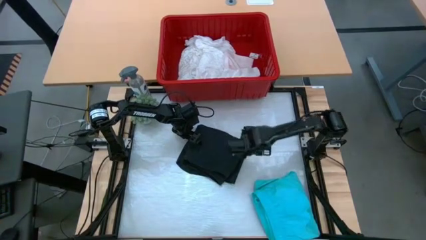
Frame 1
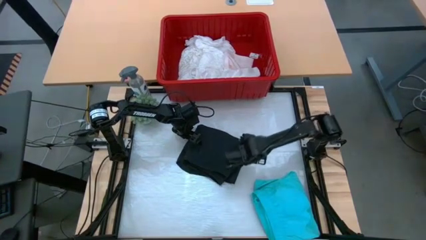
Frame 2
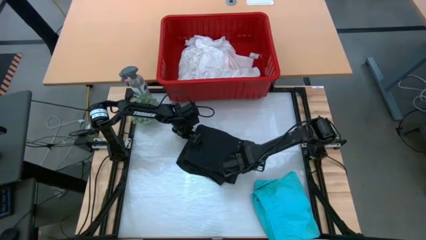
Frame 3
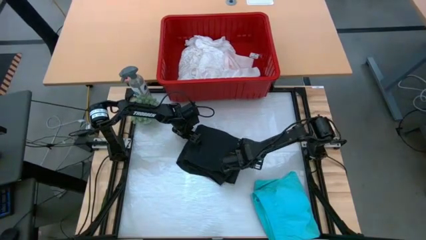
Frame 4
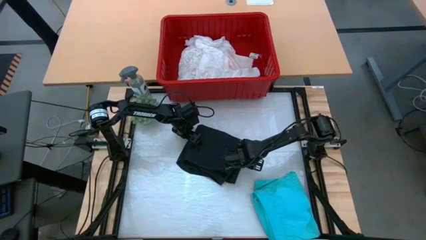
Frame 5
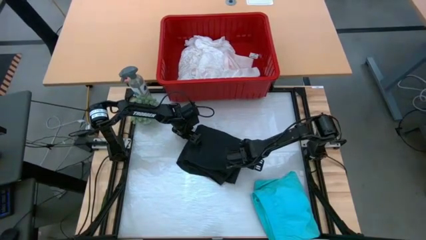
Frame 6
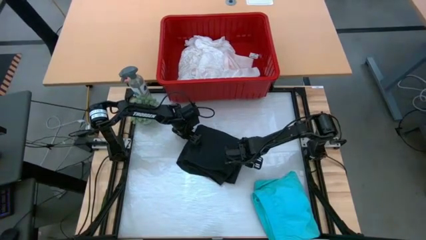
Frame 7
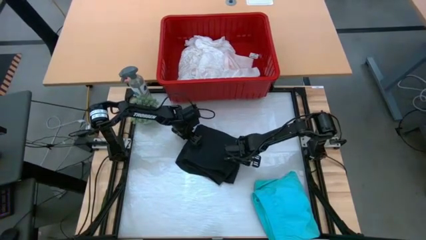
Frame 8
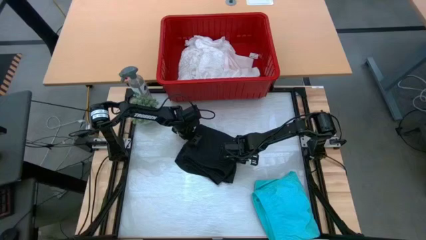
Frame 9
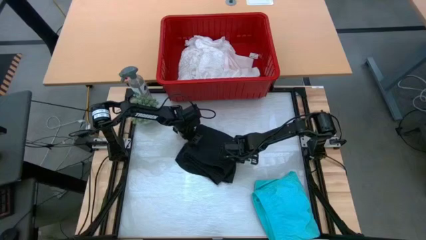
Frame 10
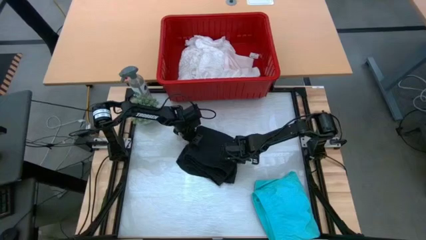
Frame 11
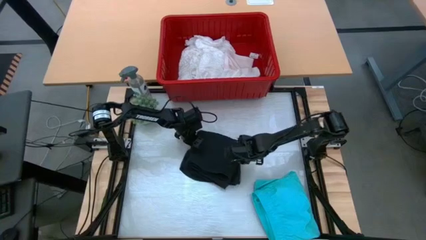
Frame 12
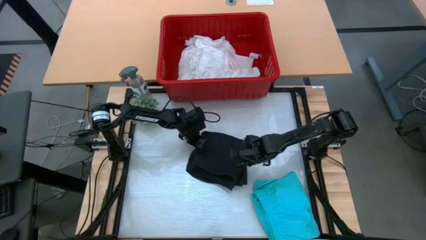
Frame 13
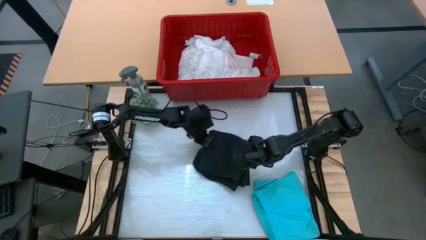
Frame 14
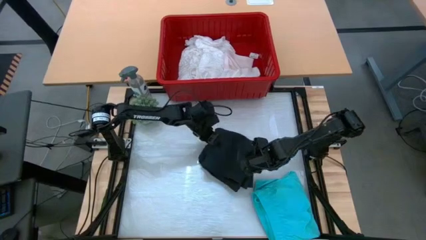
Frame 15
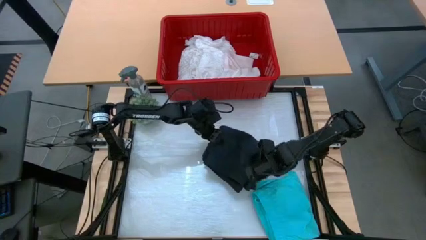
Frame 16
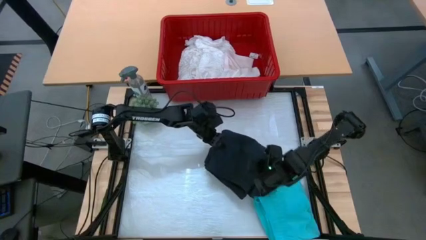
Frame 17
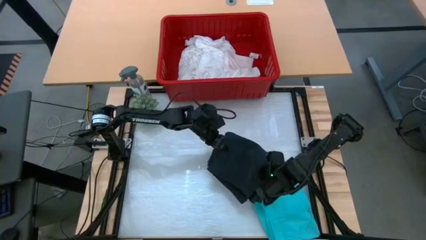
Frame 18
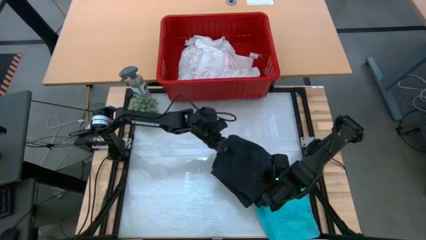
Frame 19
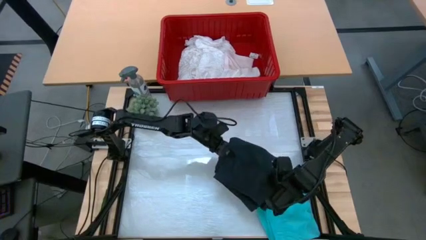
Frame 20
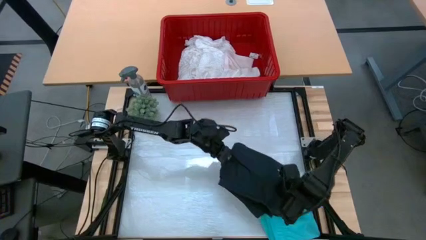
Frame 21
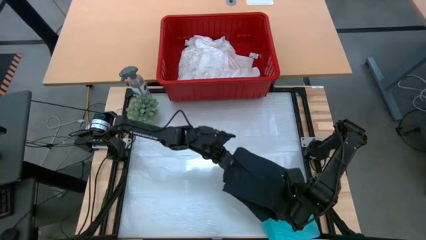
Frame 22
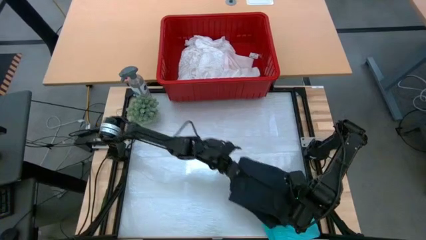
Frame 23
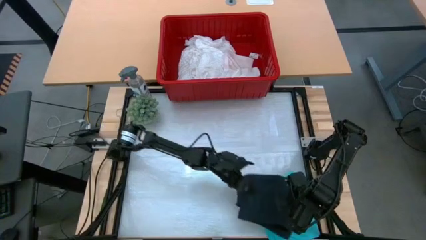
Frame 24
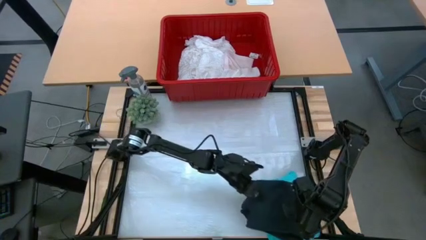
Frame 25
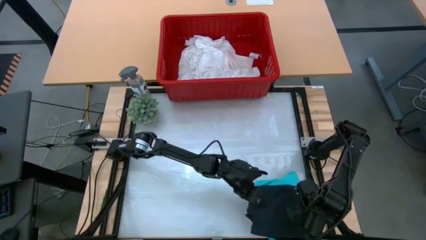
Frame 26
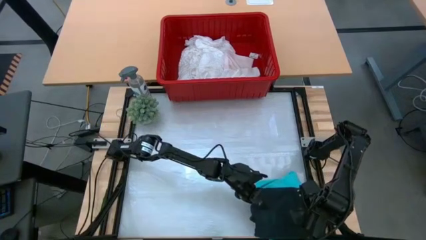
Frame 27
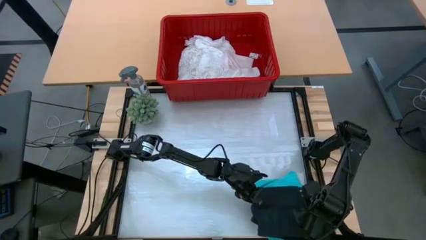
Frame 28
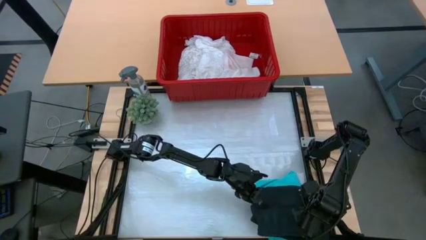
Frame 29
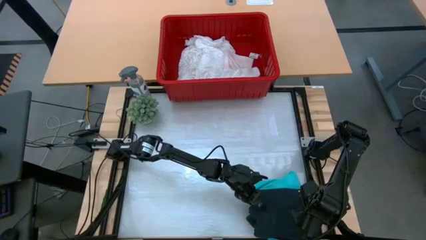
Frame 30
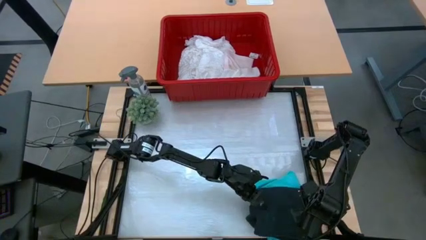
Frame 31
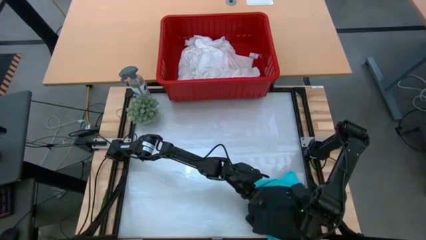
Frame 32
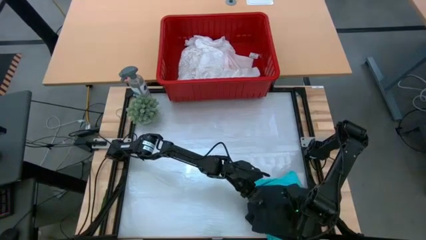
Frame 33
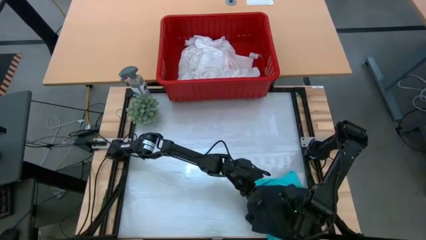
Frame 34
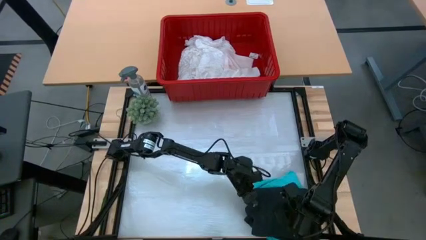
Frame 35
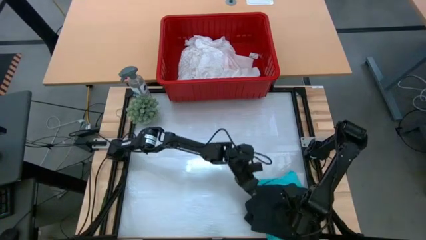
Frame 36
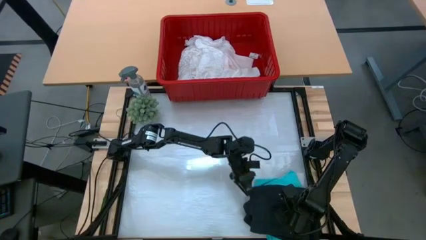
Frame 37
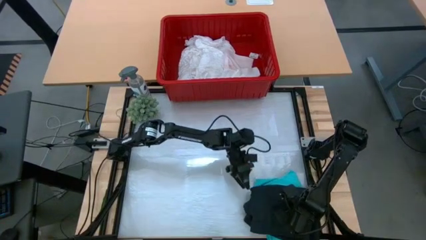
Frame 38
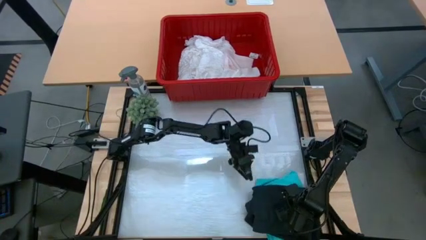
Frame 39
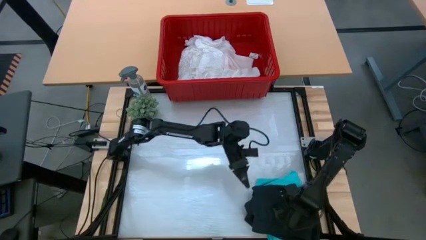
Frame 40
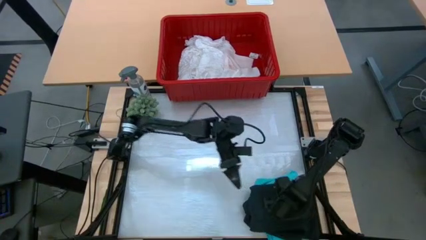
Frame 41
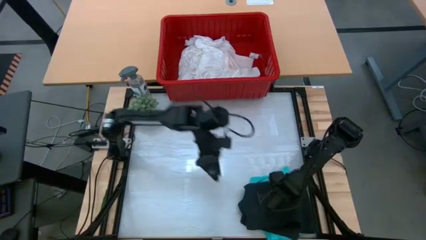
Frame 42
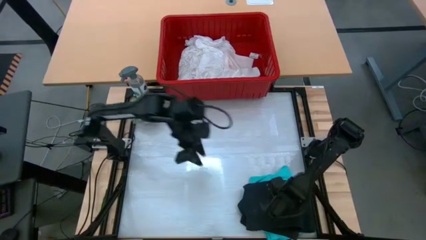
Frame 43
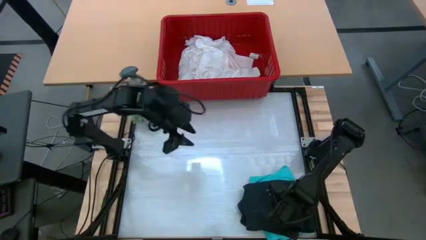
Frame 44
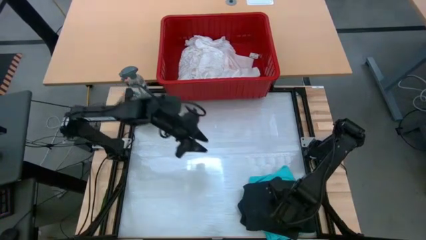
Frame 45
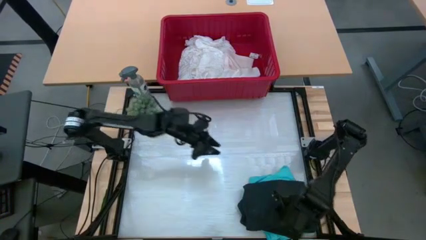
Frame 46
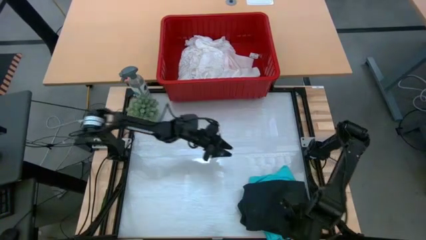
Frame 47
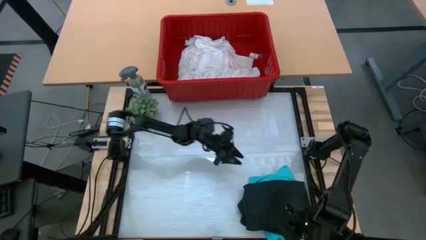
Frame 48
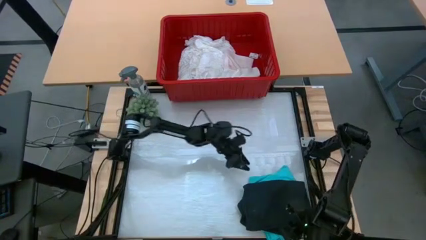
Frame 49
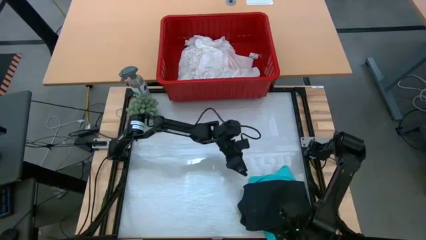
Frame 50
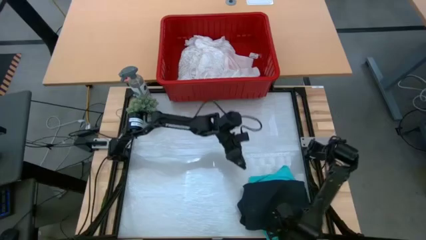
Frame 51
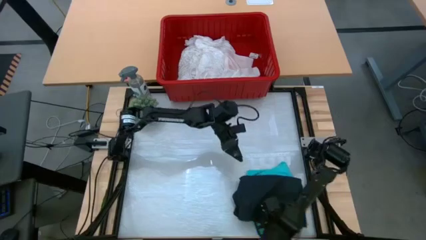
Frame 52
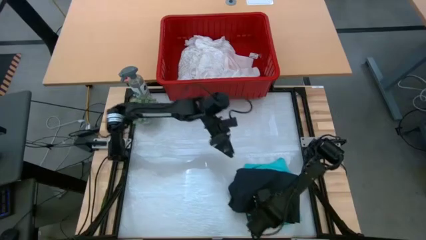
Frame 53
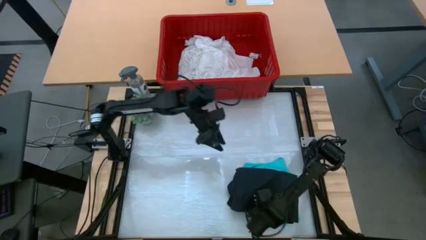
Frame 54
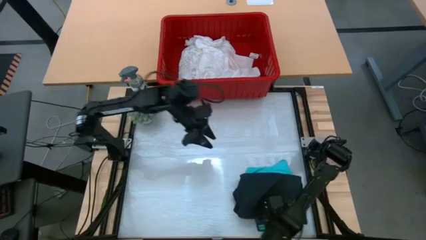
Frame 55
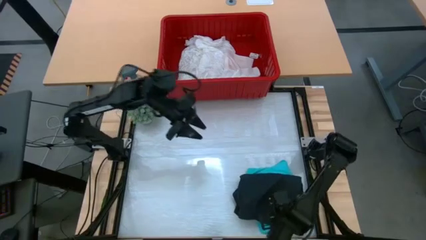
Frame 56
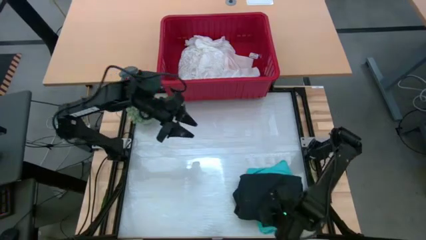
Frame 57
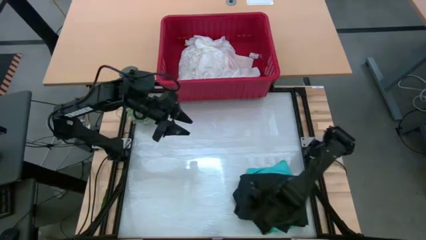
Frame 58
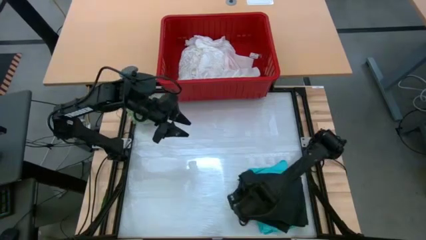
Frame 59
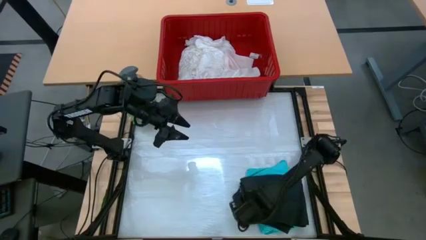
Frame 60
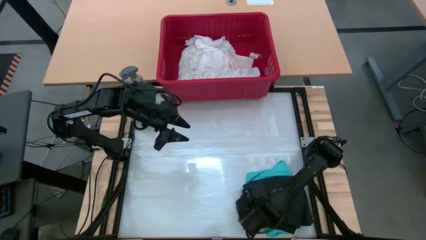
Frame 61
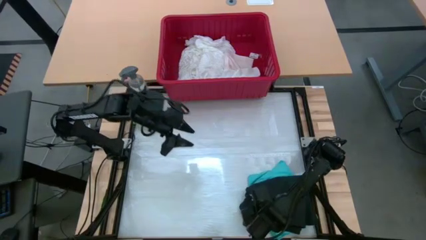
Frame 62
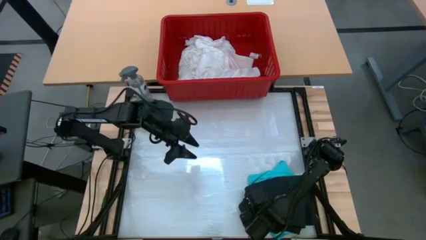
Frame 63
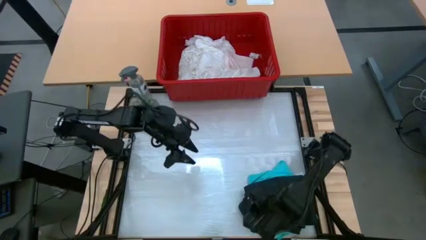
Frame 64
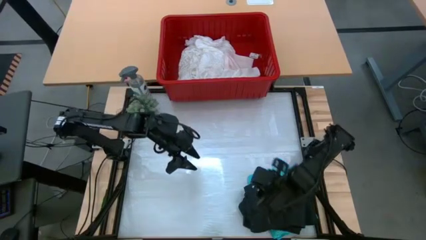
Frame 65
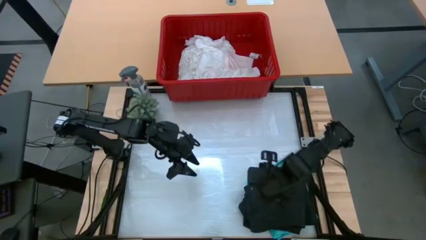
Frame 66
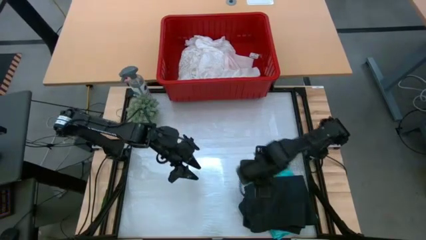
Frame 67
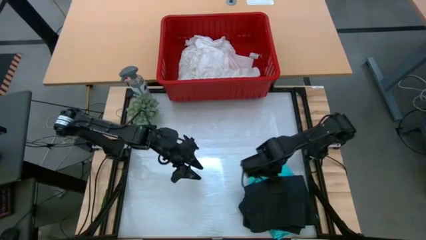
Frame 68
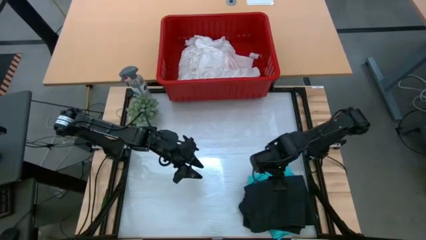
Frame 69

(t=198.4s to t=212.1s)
Task: Fold Laundry from Bin
Stack the black shorts on top of the blue shorts

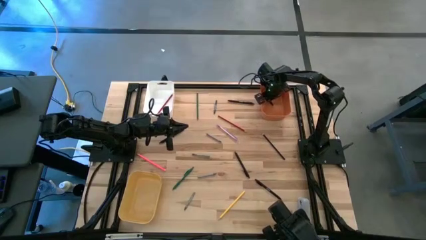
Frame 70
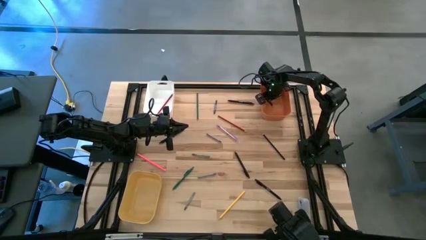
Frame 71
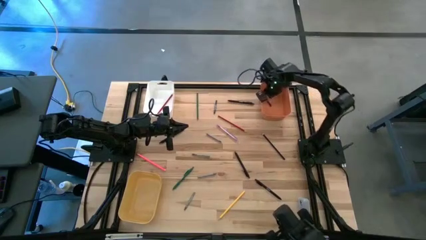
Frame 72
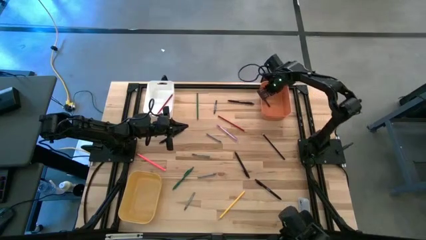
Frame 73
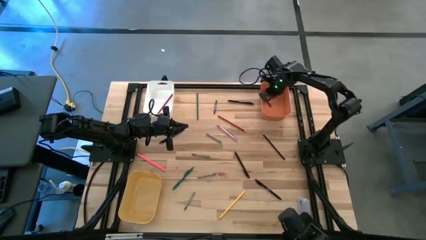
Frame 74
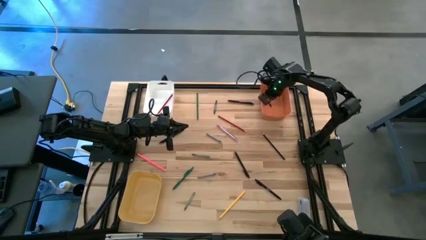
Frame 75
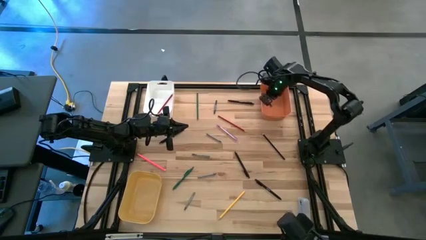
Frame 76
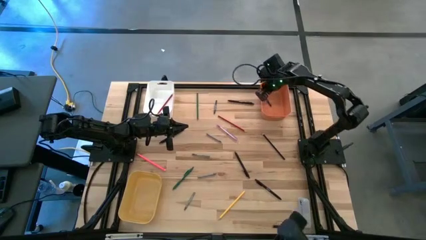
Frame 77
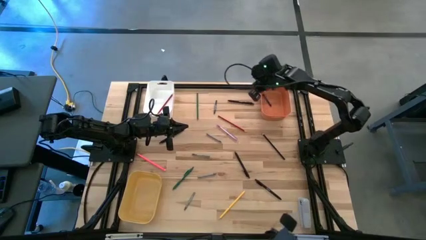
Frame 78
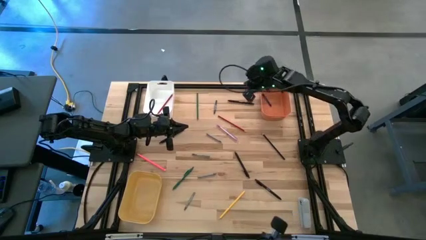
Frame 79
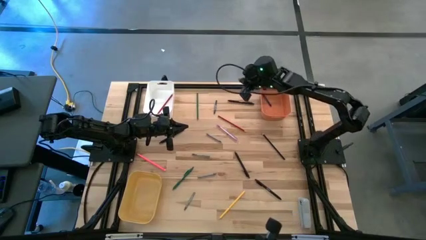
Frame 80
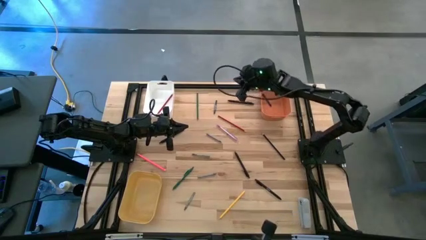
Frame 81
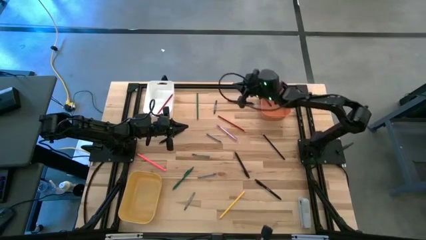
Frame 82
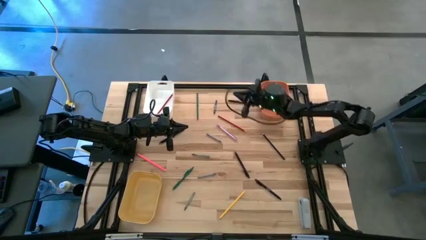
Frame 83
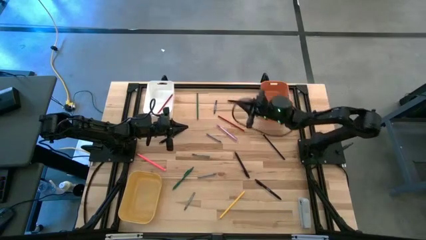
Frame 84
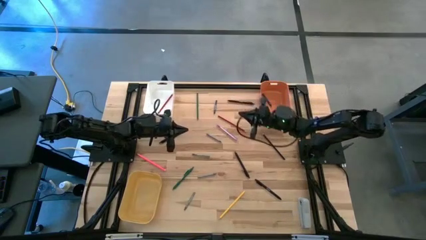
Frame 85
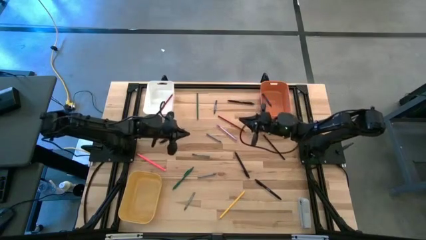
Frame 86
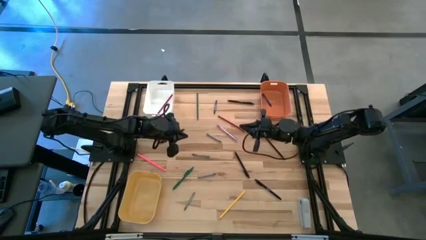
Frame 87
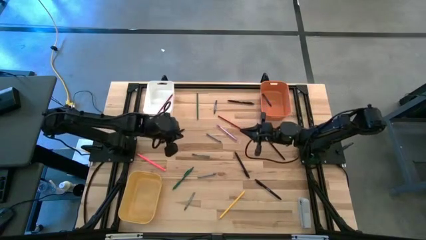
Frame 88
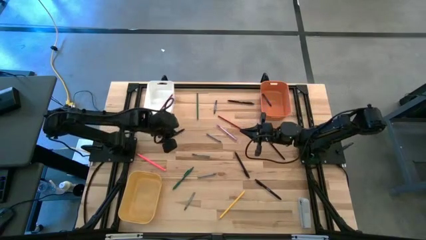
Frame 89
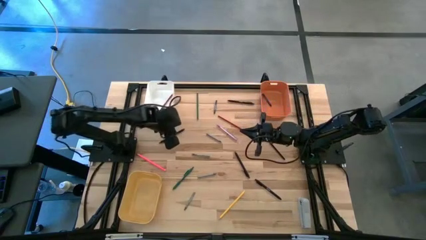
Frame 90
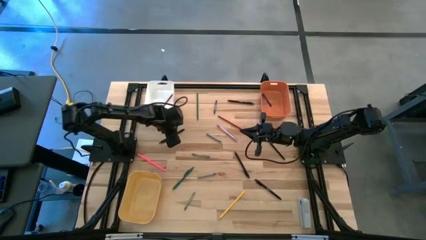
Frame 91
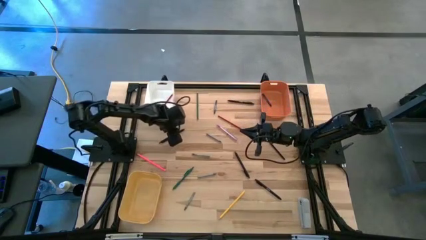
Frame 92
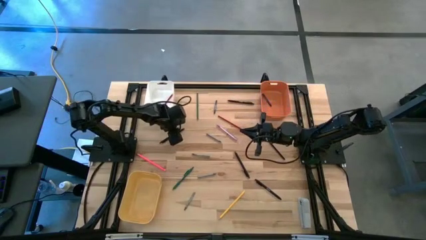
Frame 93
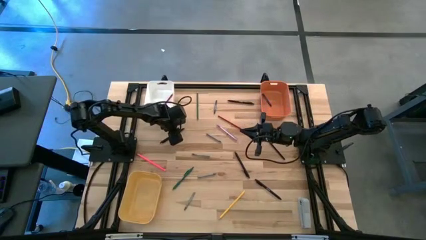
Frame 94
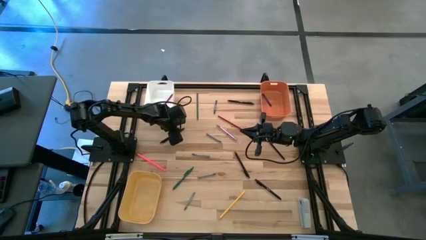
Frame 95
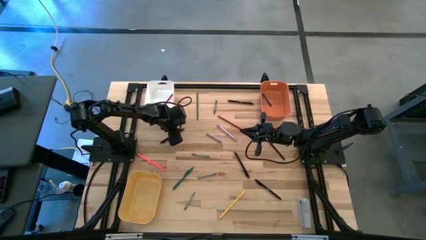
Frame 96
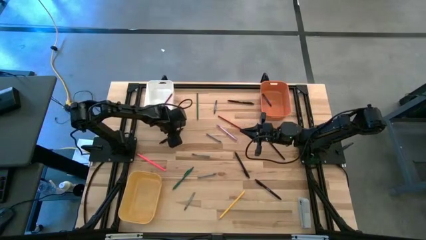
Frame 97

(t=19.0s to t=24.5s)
Task: Sort crayons/erasers/pens/pencils in bins
Put the top middle black pen into the yellow bin
